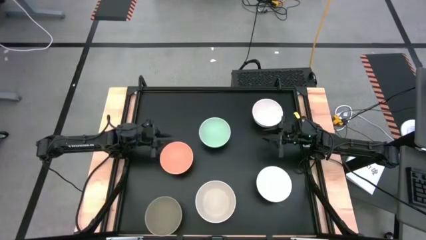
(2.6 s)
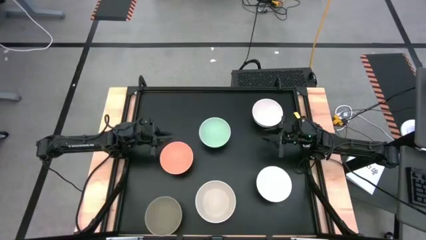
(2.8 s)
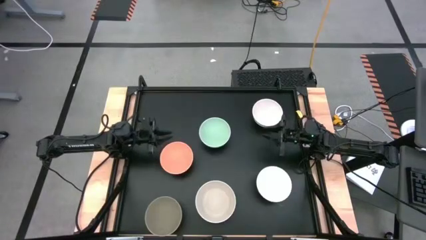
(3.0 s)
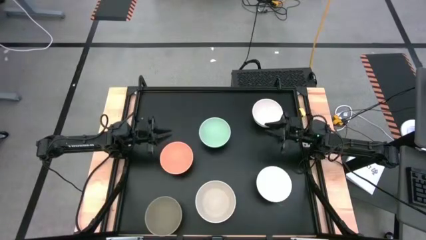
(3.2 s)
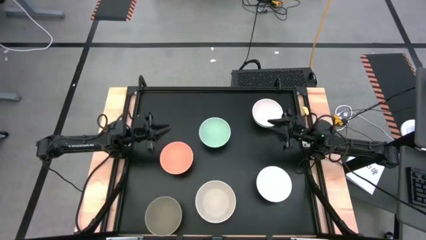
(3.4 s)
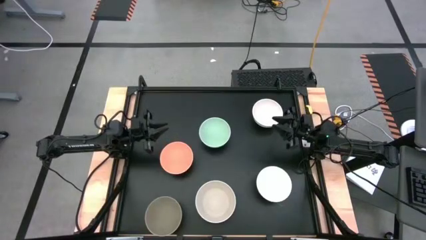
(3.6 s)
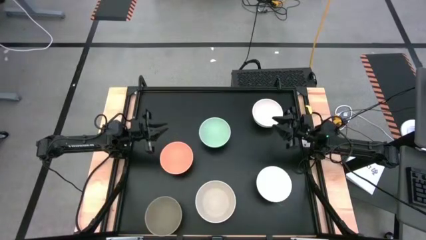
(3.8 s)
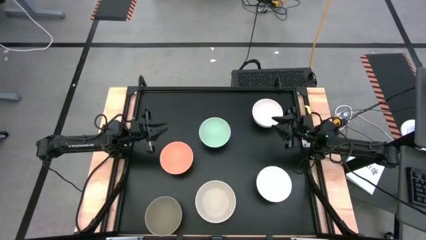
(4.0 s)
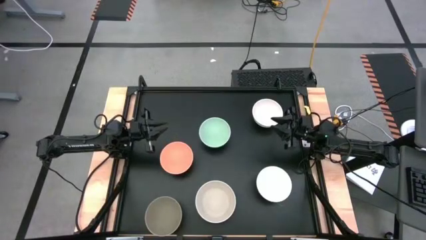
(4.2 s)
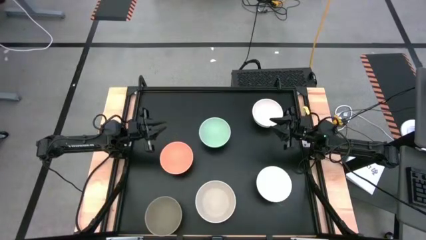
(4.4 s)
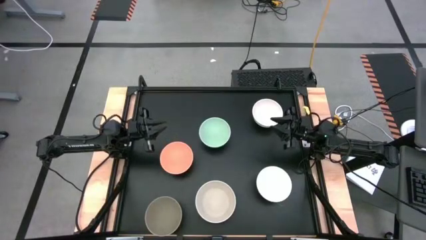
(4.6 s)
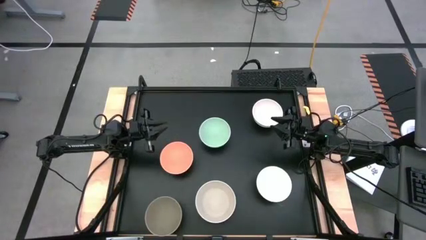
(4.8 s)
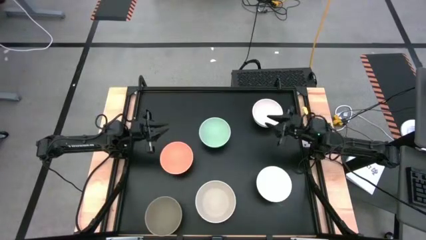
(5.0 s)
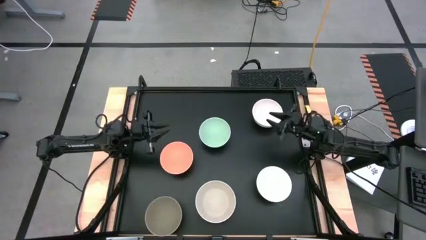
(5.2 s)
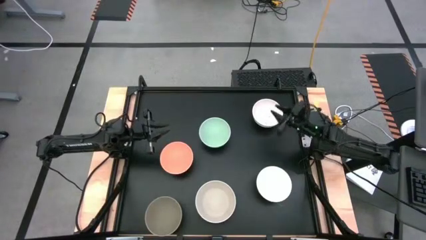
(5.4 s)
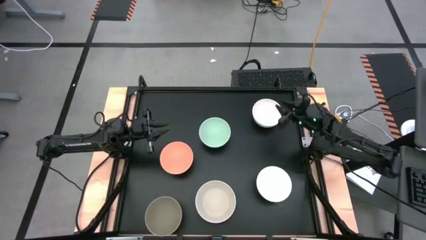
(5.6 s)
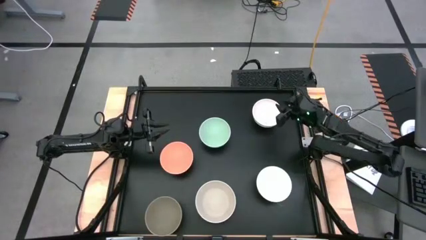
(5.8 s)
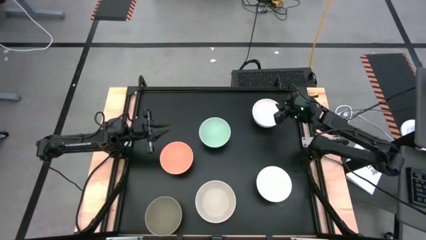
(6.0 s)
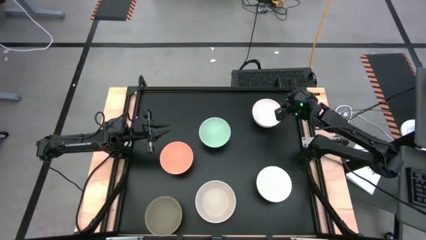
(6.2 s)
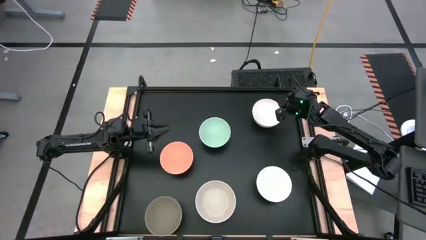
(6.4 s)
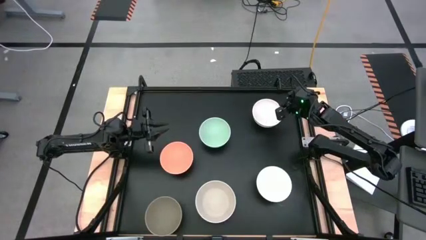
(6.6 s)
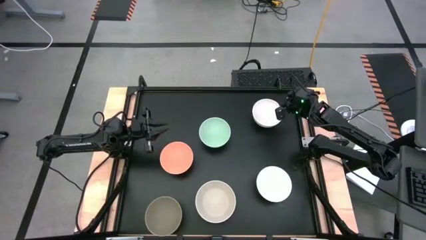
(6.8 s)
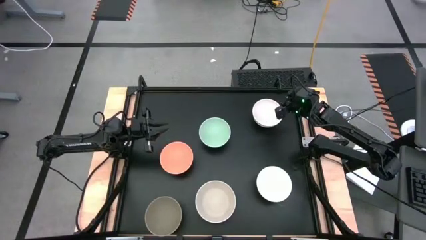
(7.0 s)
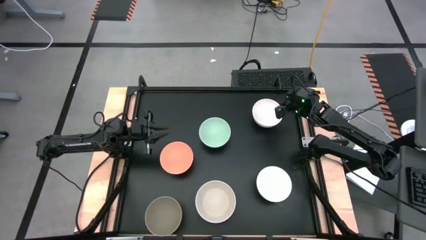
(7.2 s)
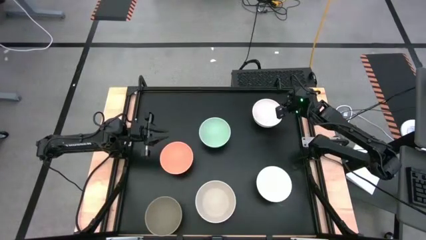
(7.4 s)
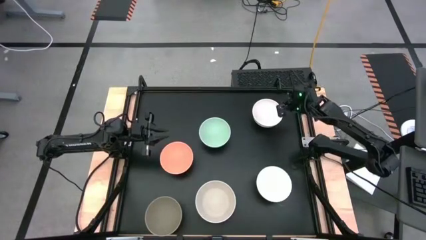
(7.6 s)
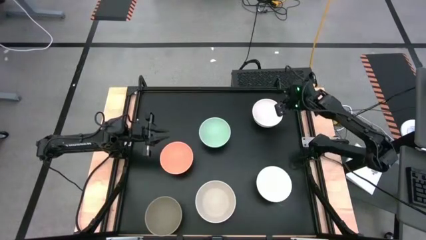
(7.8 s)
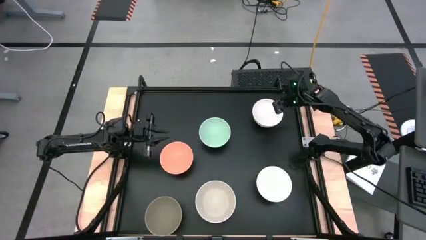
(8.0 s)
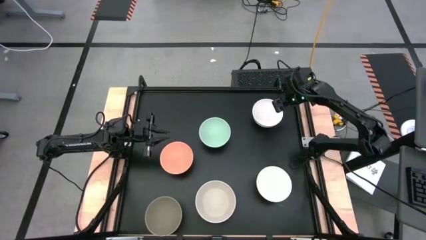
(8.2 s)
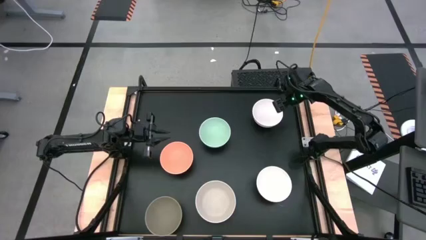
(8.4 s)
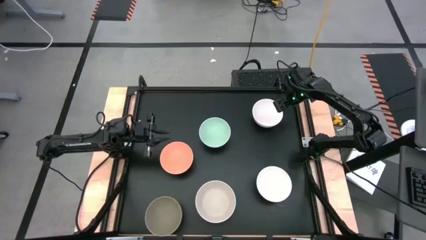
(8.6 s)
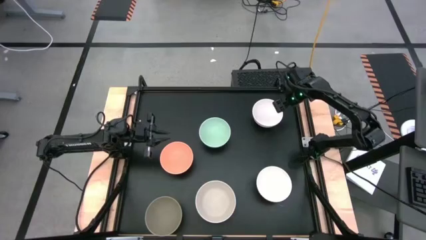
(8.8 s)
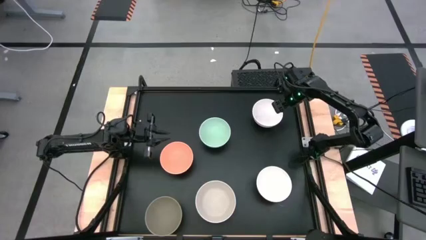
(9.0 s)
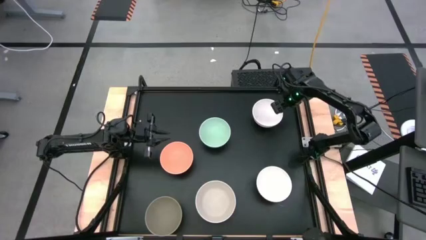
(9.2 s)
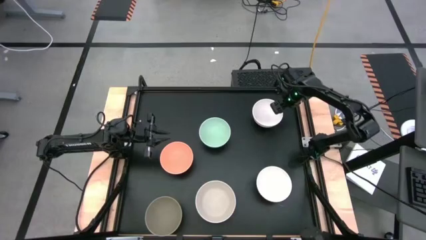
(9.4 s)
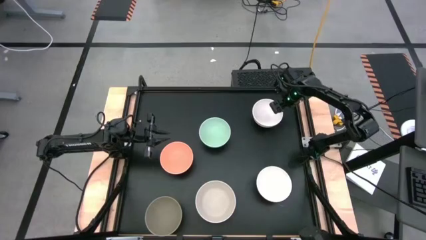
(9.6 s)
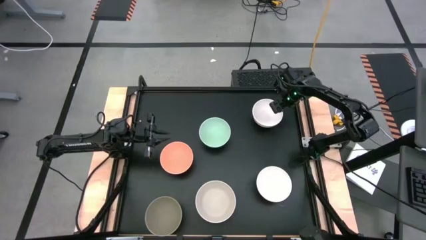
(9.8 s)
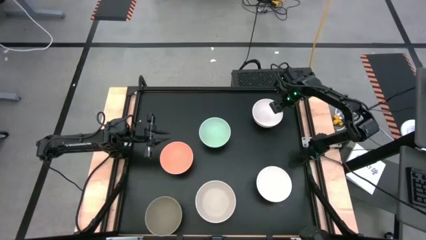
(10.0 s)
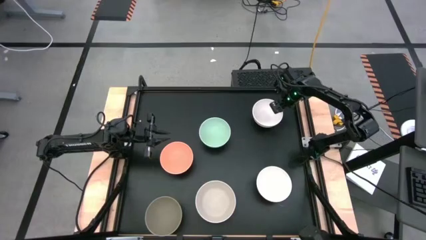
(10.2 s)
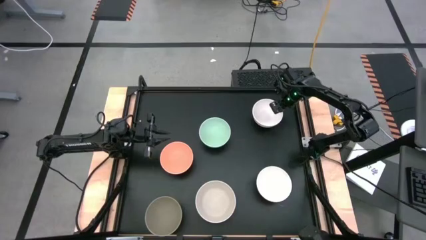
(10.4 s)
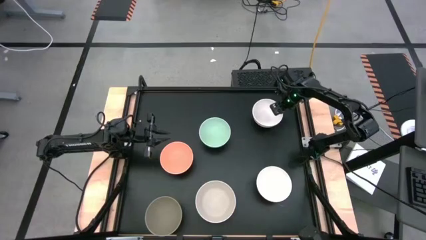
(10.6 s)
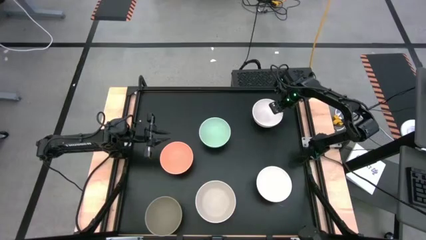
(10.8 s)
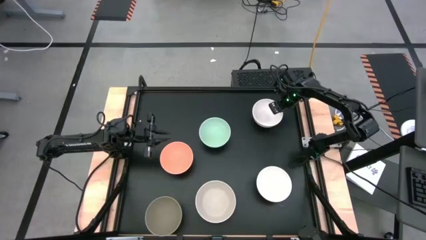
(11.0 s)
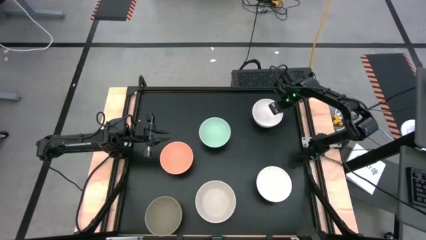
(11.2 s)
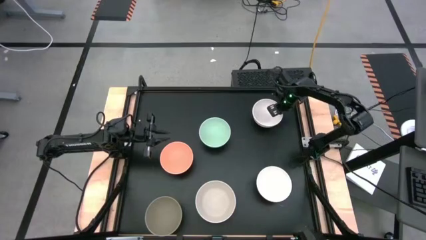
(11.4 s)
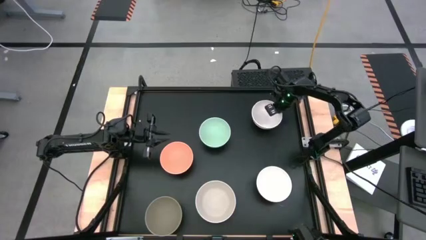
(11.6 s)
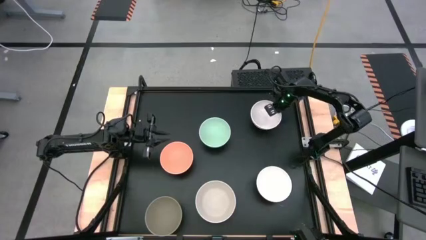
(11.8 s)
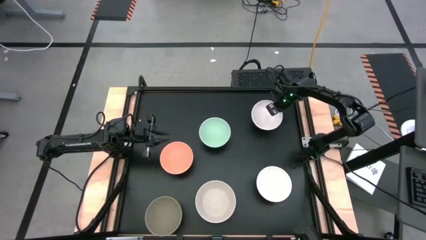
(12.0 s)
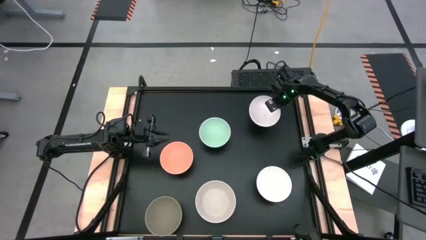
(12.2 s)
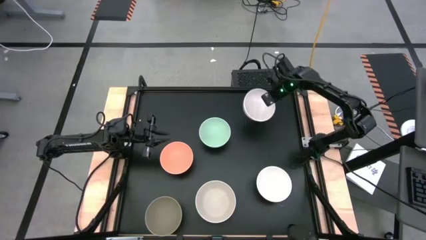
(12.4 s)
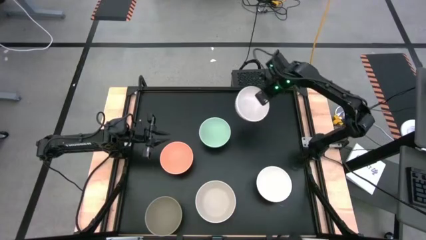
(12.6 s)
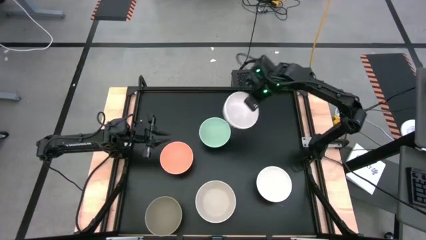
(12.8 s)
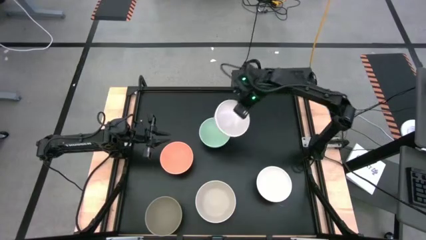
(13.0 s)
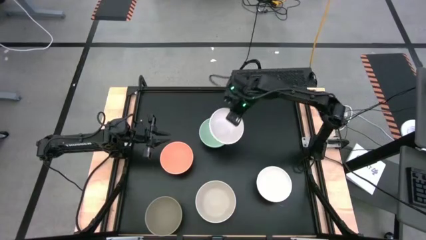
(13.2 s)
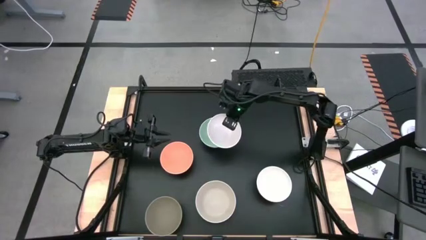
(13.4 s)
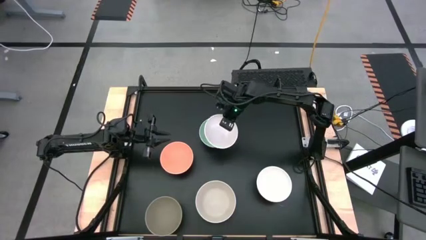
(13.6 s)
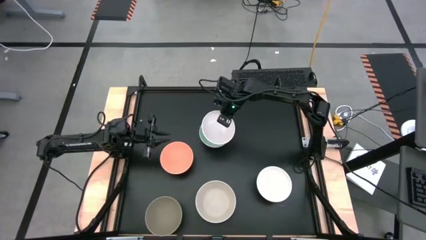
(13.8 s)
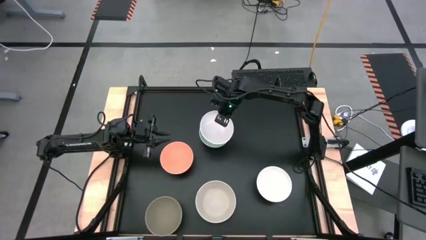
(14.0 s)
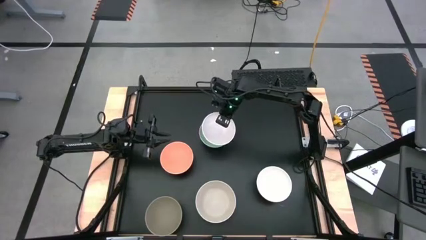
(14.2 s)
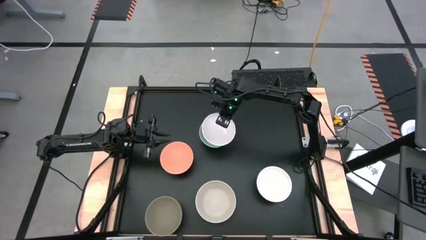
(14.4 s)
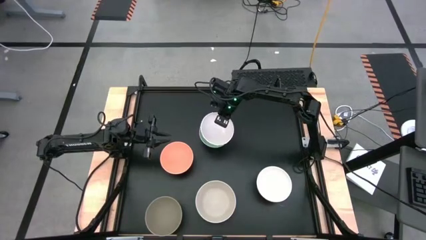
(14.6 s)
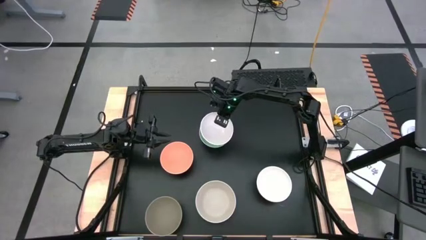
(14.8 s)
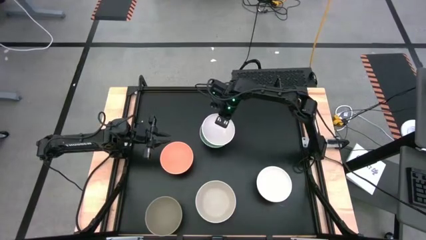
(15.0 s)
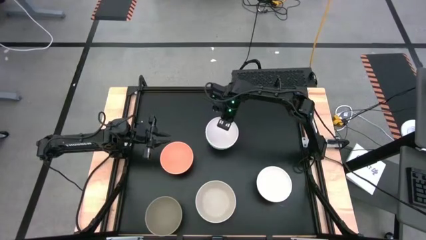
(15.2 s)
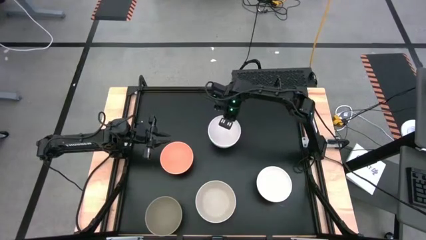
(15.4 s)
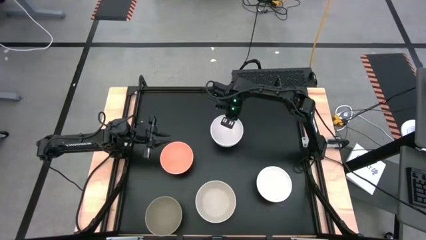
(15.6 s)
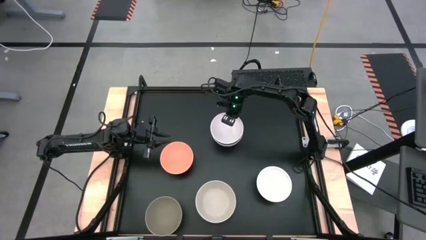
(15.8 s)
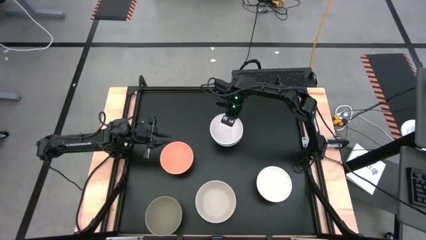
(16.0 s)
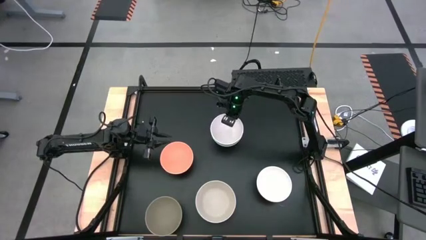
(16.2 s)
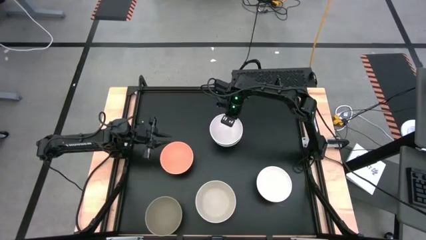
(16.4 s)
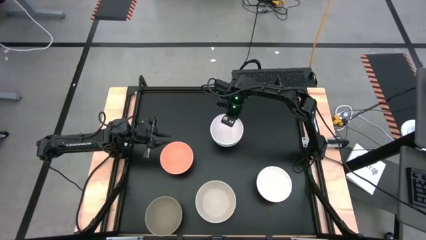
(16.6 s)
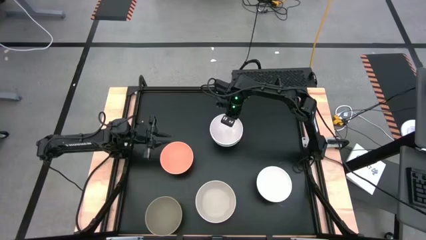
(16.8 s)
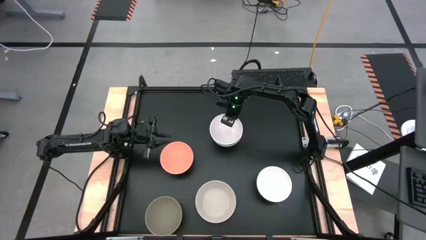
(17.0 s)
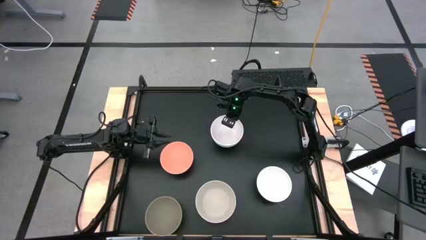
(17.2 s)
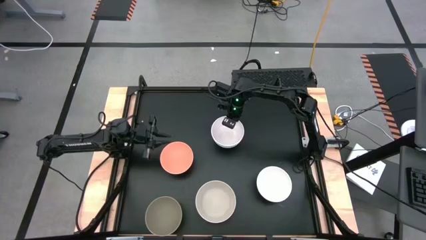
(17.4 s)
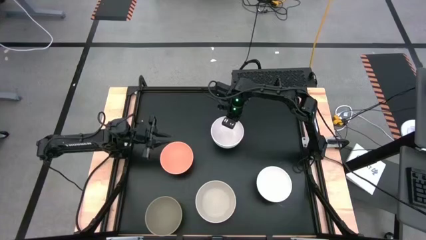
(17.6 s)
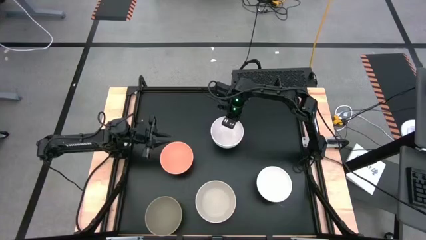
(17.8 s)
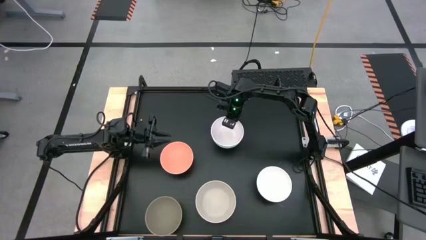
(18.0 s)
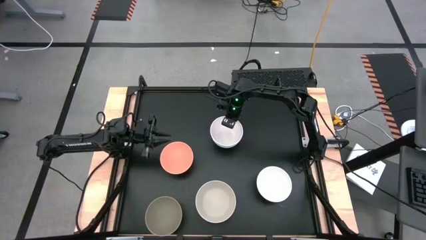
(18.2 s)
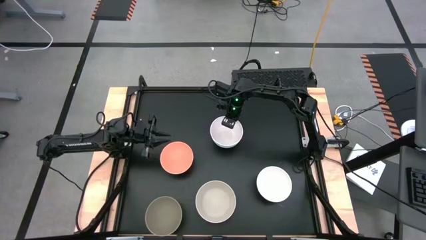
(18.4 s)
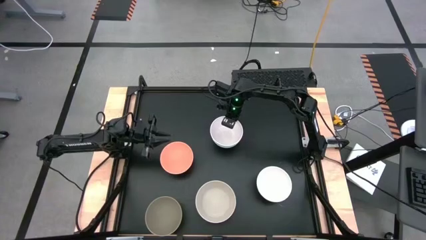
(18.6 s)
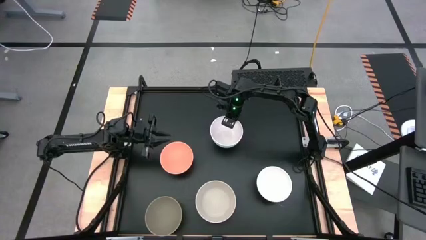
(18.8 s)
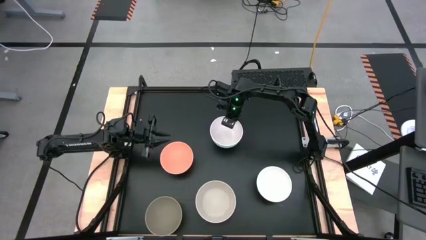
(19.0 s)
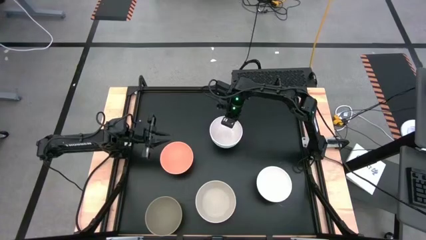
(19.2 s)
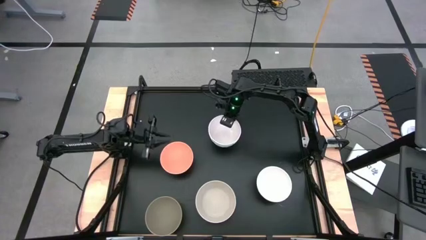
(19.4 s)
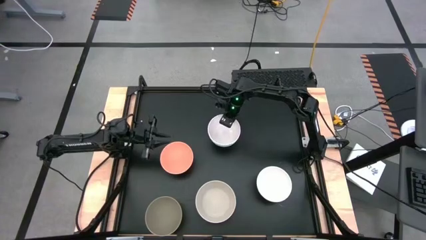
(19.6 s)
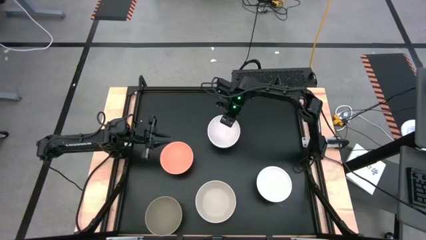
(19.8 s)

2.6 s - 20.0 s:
Task: Nest bowls inside each other
Stack the white bowl on the light green bowl
